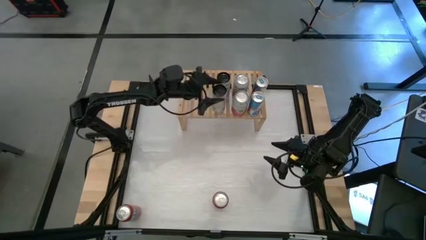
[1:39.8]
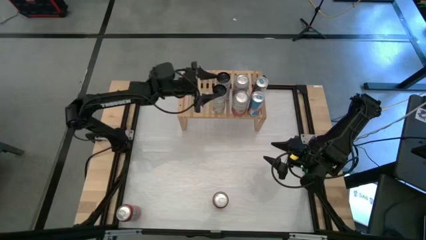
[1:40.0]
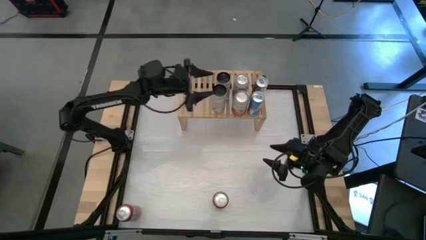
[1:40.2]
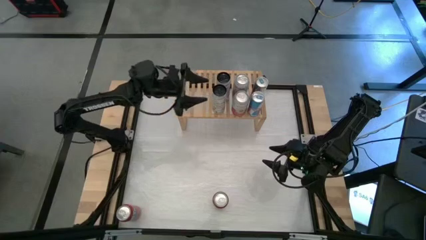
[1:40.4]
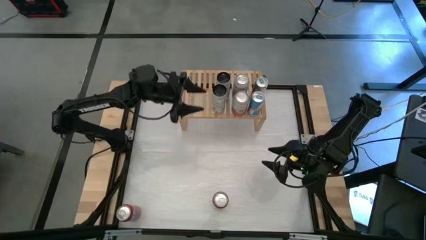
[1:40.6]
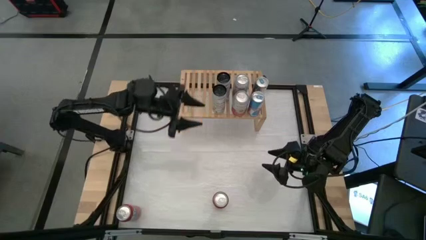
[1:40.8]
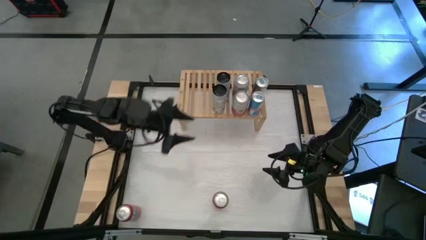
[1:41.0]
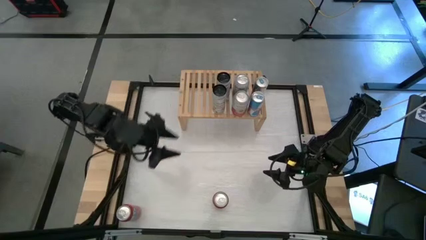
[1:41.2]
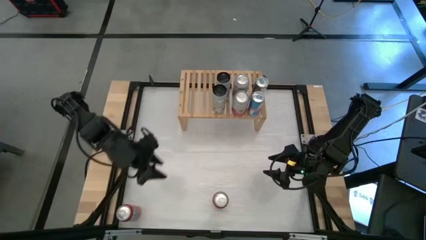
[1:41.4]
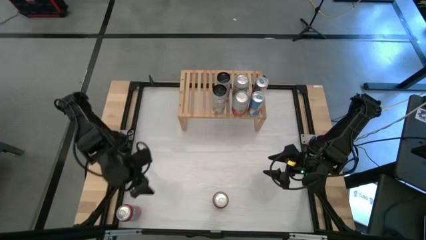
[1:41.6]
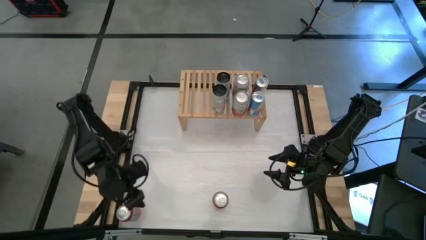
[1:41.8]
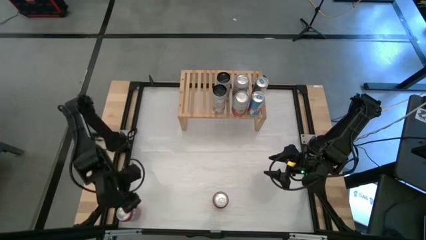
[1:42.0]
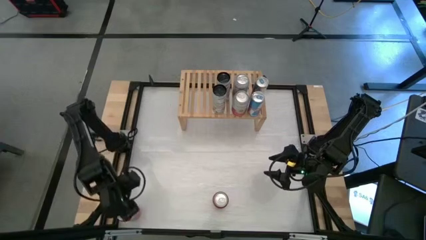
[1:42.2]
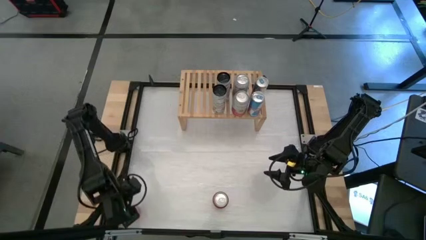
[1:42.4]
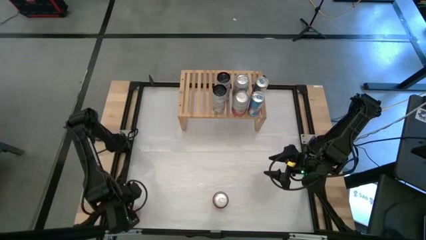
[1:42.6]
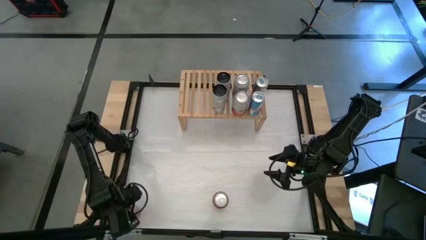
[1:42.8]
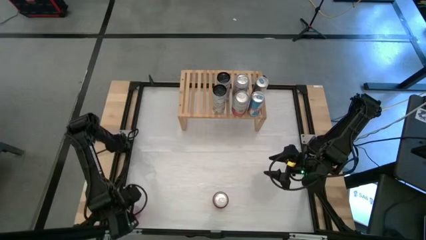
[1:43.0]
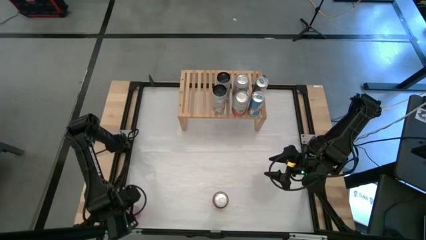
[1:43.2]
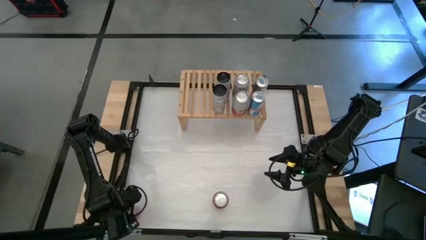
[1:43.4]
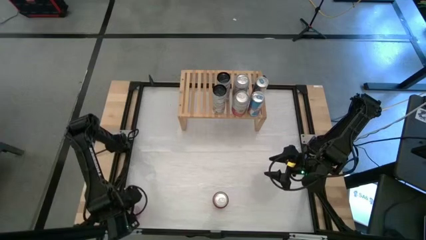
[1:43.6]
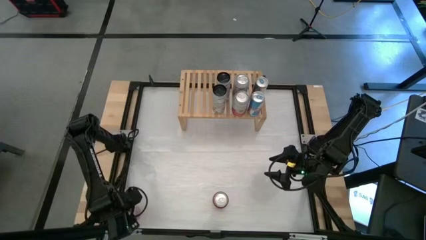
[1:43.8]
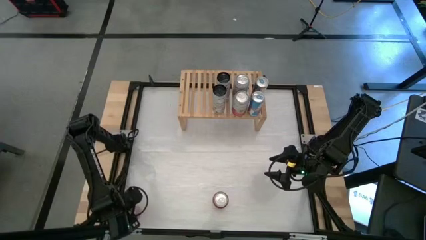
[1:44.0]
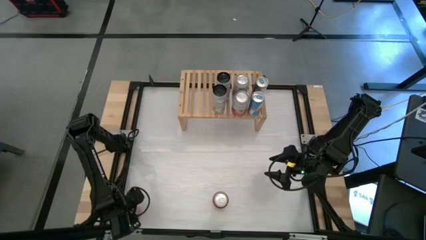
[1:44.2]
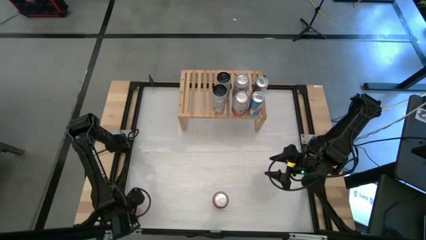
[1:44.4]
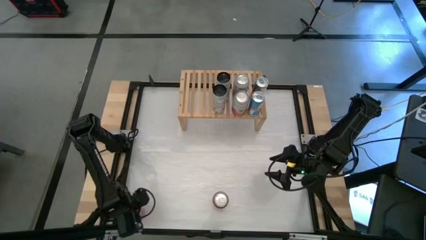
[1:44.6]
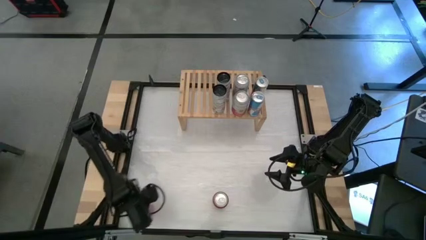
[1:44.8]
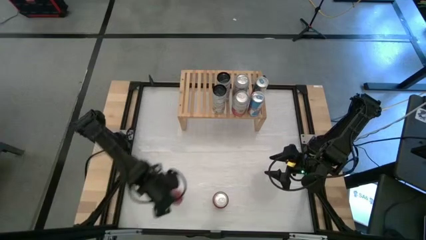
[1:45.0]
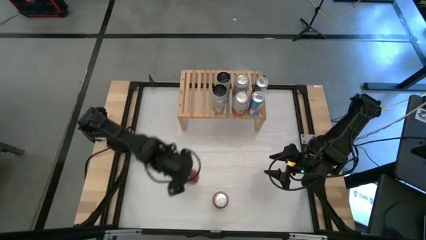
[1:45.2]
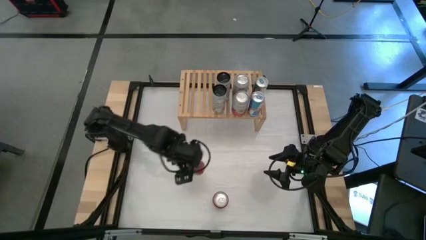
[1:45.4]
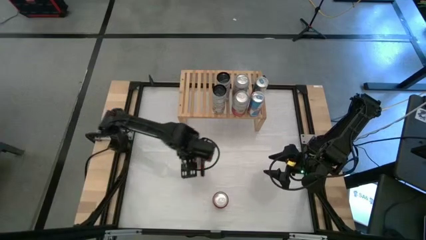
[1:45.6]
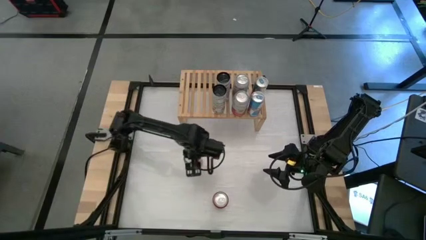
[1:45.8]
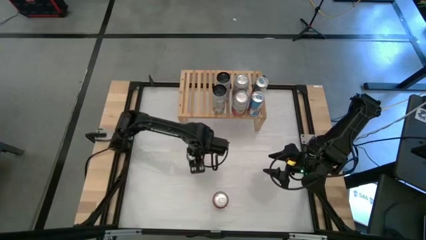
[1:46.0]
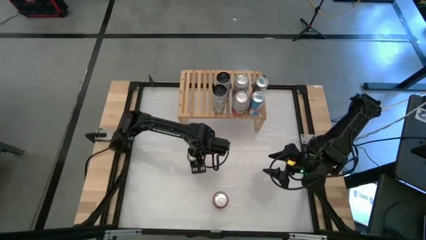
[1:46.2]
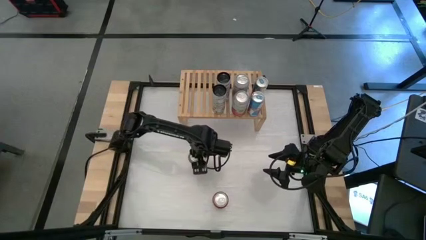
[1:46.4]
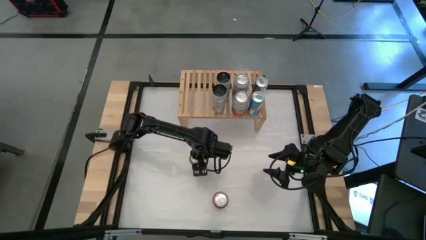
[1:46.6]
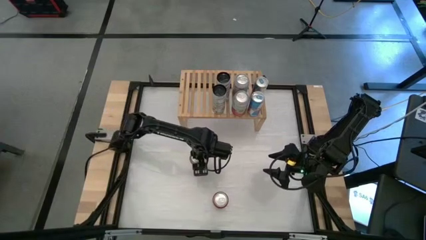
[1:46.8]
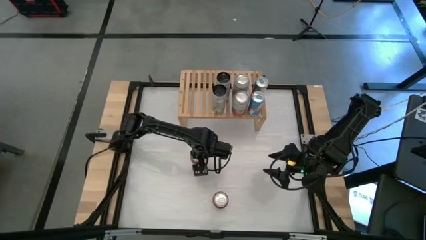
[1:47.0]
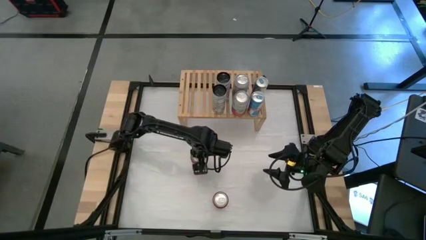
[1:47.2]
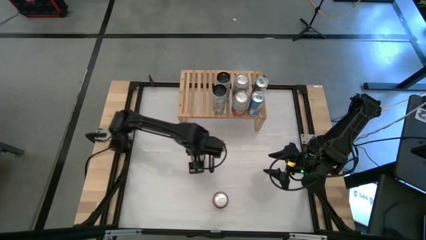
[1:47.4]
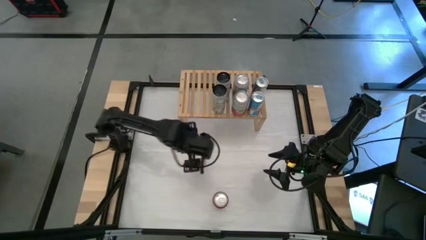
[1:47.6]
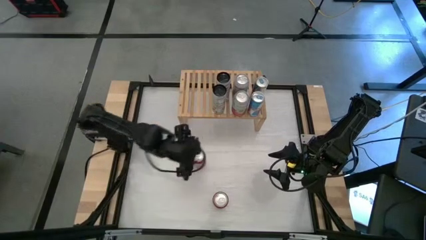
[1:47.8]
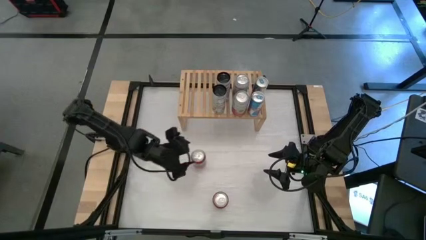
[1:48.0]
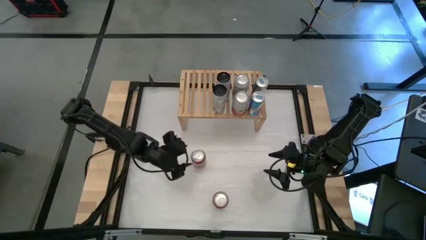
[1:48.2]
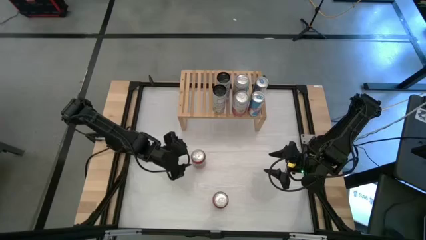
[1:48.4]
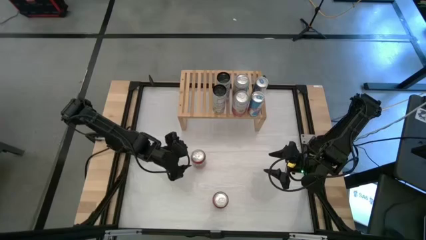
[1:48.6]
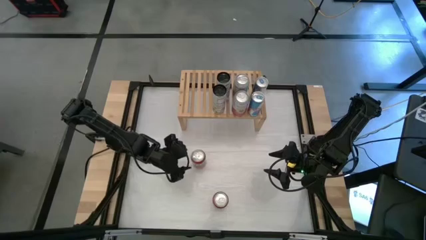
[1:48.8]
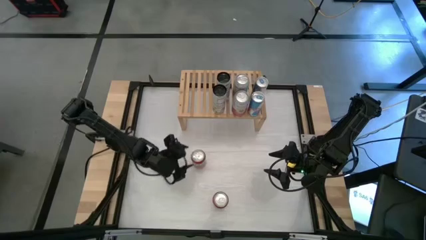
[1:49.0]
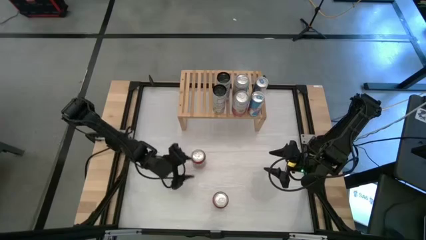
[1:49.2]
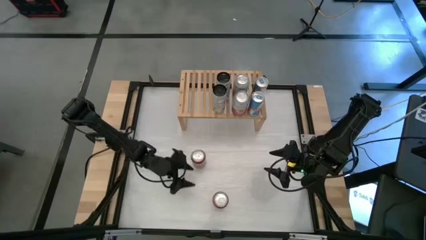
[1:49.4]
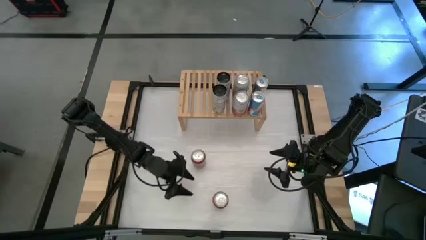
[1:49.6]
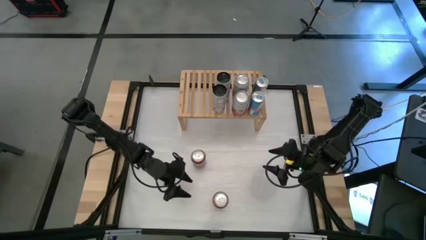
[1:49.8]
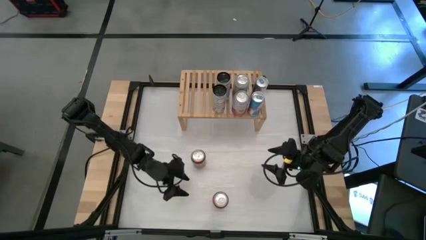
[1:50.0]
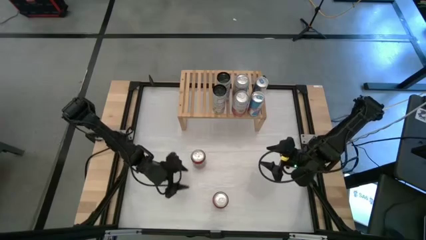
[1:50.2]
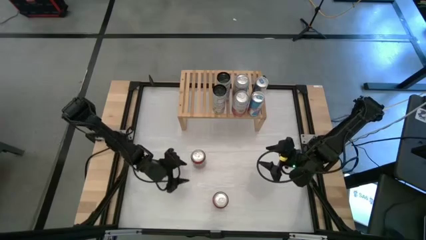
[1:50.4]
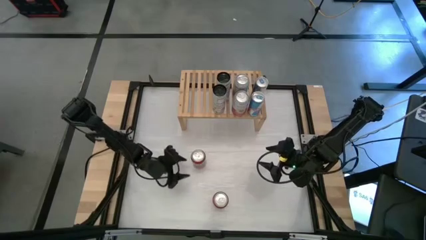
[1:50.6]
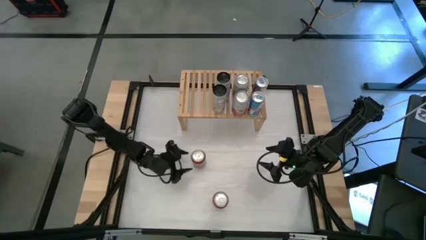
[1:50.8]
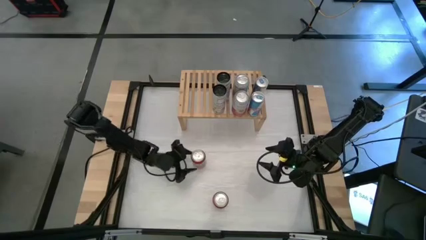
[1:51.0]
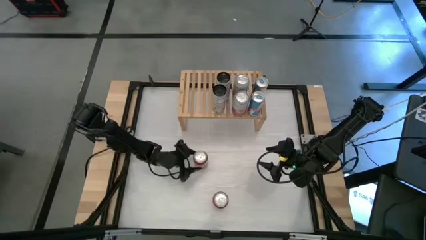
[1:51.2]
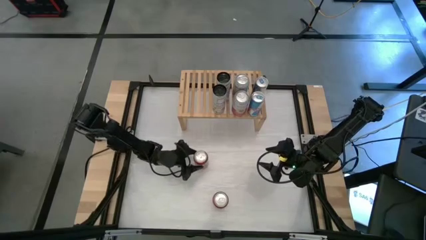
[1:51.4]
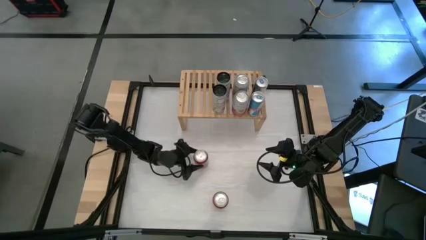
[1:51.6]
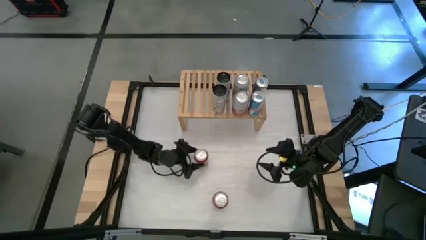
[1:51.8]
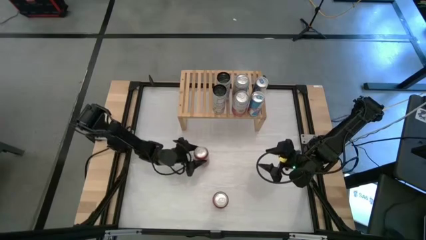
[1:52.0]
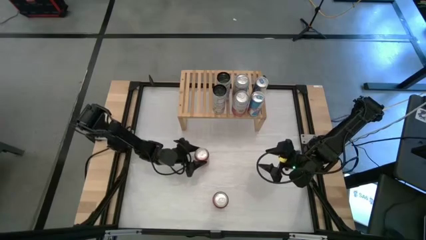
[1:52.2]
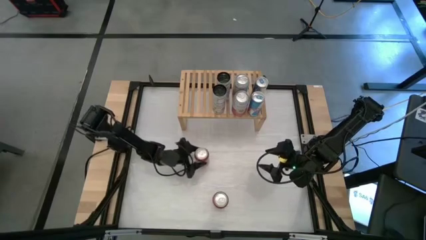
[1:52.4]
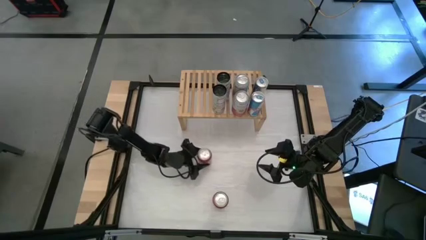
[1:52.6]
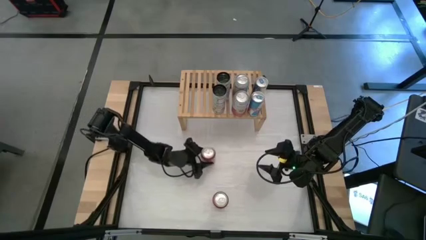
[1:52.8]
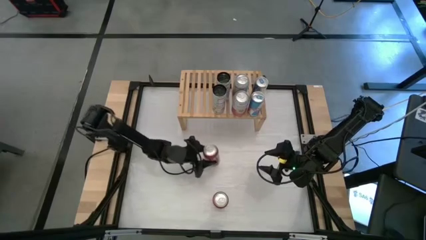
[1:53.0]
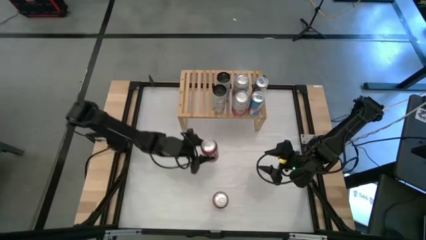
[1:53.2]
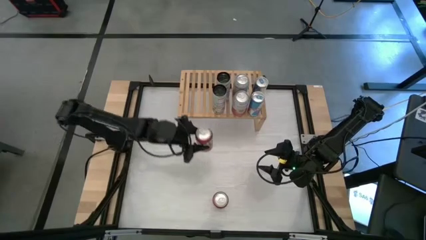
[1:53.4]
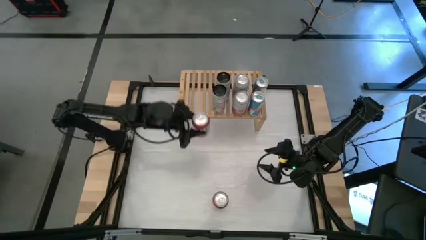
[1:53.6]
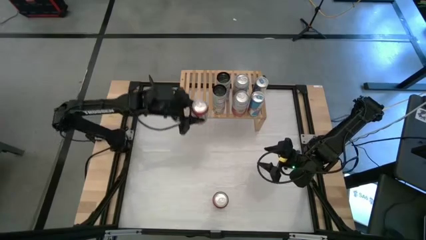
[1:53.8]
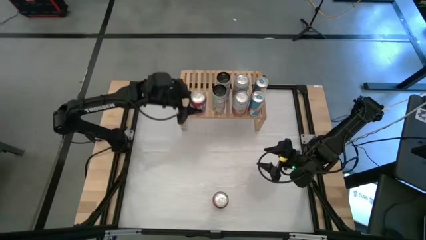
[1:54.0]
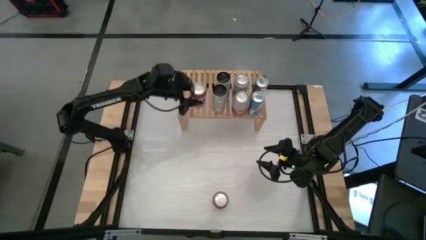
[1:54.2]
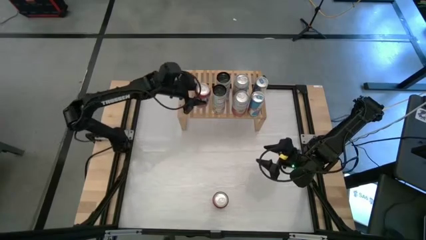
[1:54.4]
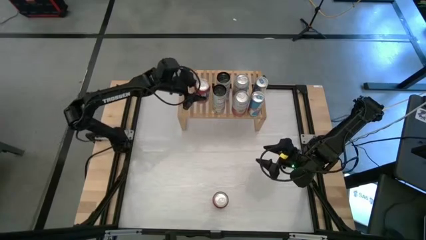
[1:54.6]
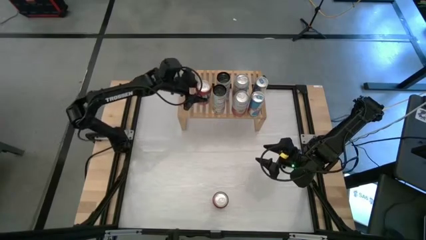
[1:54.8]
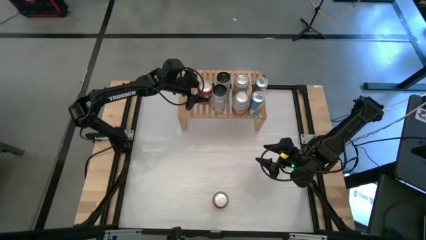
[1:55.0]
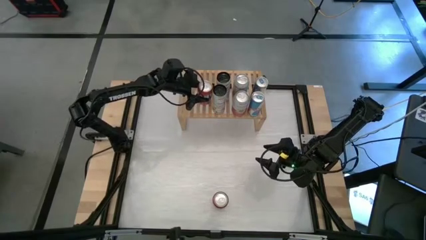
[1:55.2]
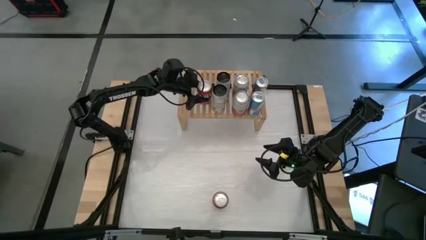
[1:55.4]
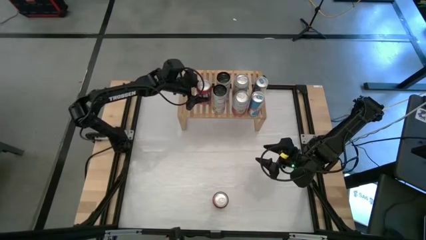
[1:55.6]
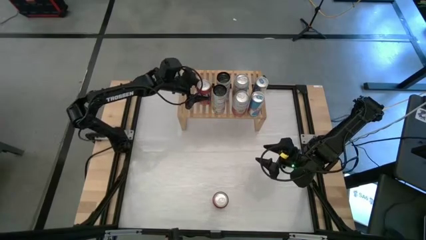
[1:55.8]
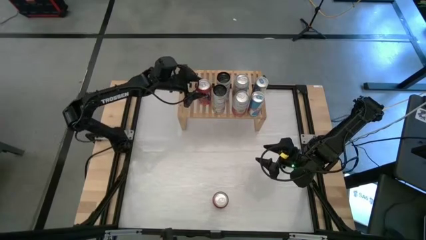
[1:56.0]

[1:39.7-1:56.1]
Task: Place canned beverage on shelf
Put the top red soda can on the shelf

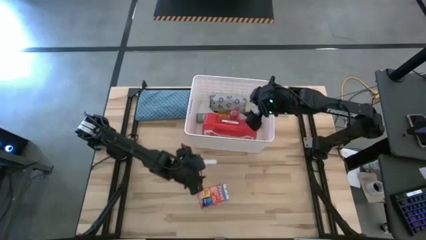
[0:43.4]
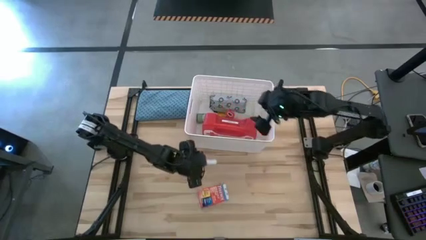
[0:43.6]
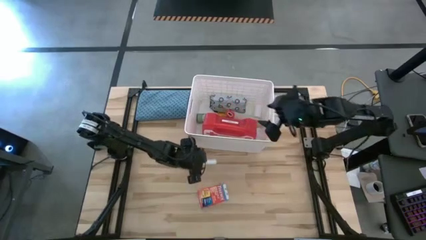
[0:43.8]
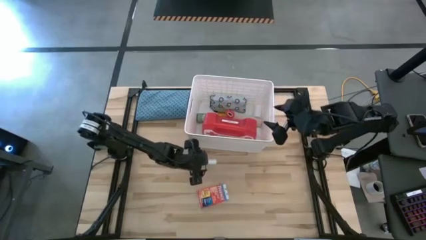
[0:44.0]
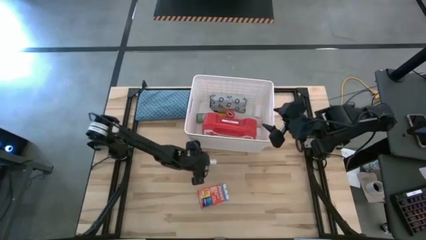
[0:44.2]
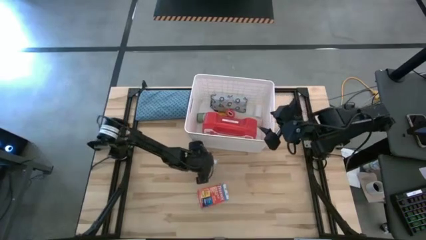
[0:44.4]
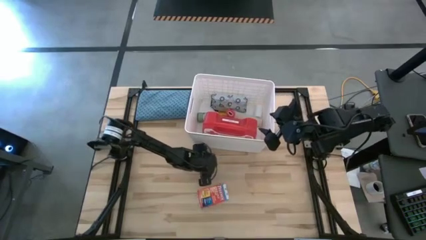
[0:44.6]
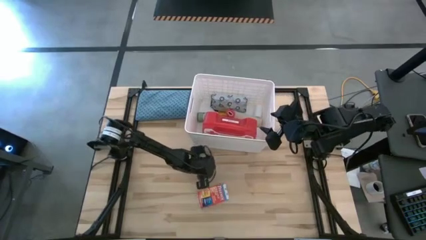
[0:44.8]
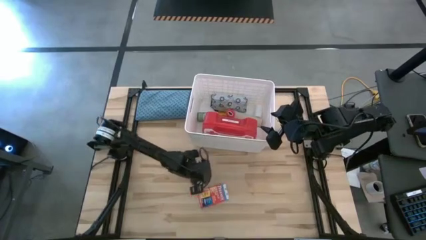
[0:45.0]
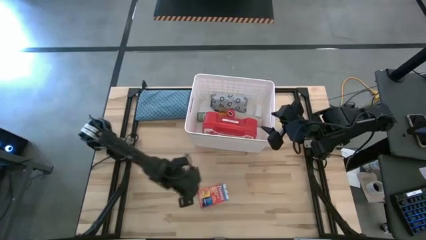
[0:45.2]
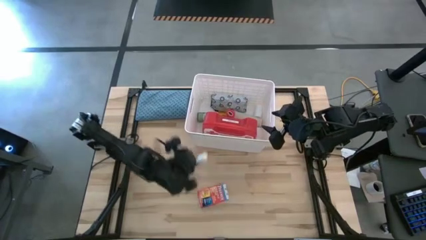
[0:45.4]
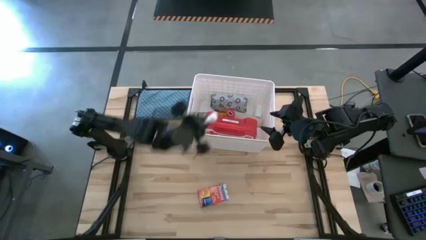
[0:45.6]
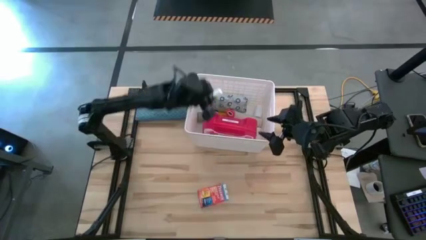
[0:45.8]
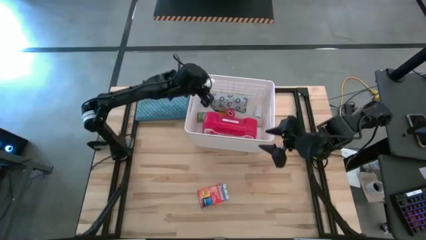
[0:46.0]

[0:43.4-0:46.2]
Task: Pick & place medical supplies in basket/bin
Put the white rolled gauze into the white bin
